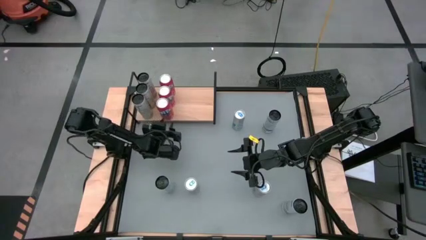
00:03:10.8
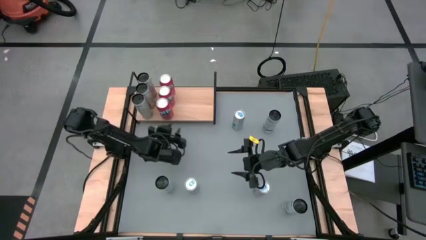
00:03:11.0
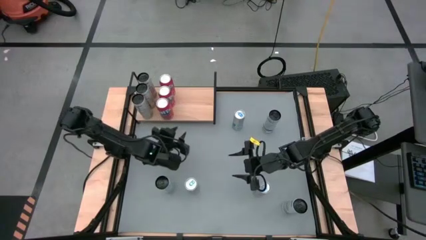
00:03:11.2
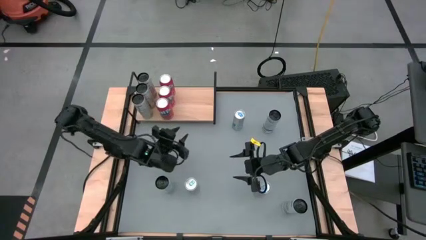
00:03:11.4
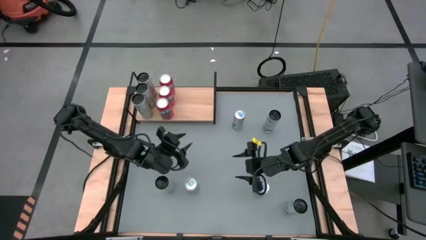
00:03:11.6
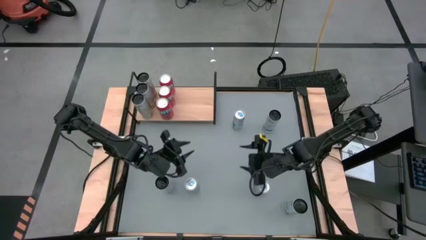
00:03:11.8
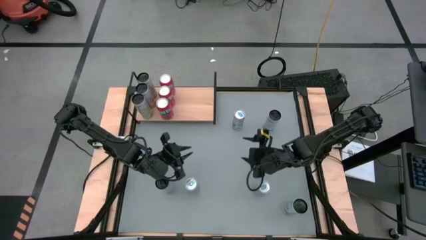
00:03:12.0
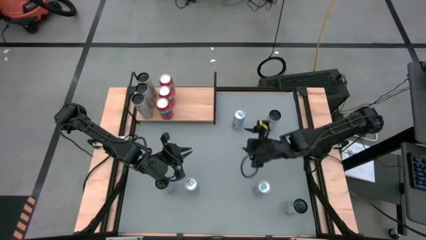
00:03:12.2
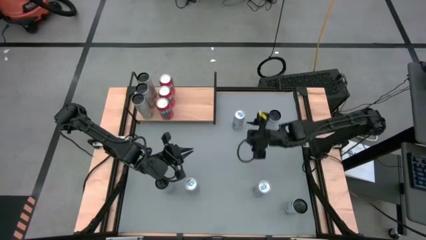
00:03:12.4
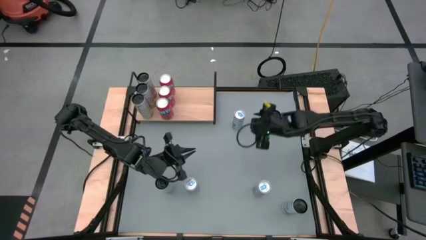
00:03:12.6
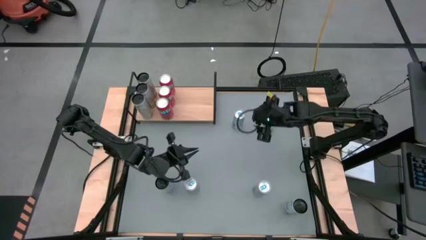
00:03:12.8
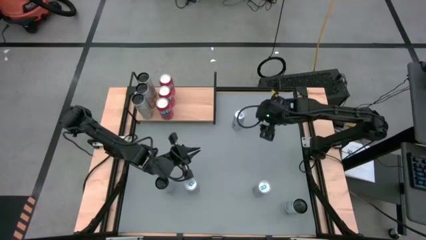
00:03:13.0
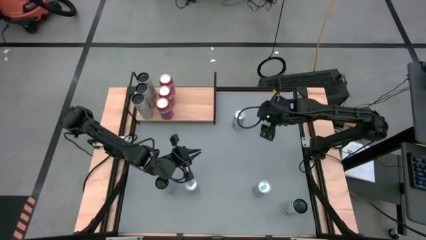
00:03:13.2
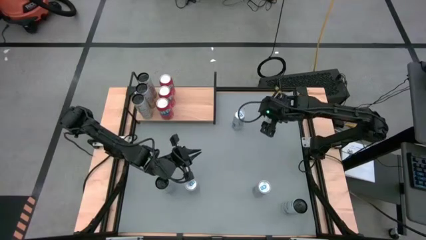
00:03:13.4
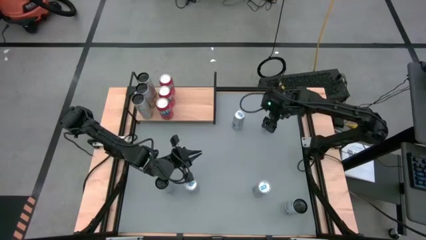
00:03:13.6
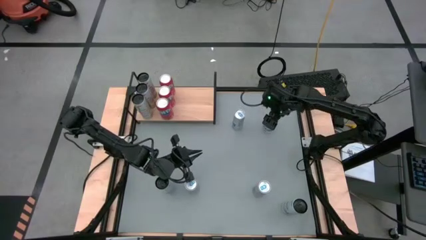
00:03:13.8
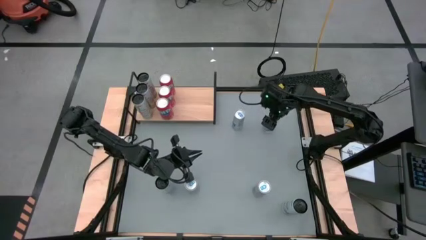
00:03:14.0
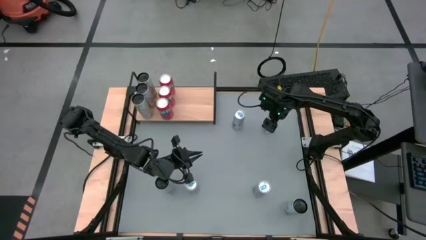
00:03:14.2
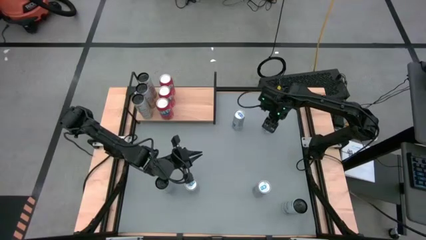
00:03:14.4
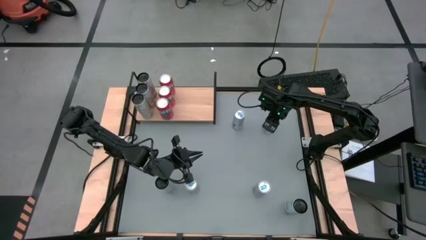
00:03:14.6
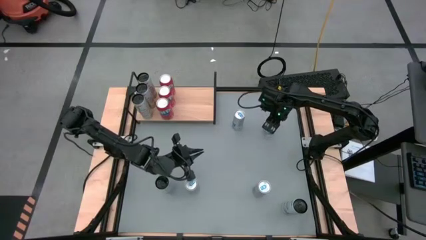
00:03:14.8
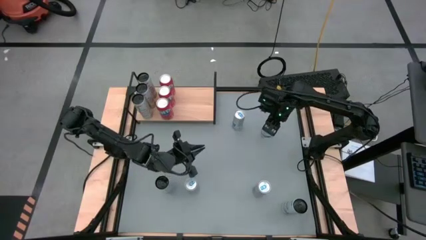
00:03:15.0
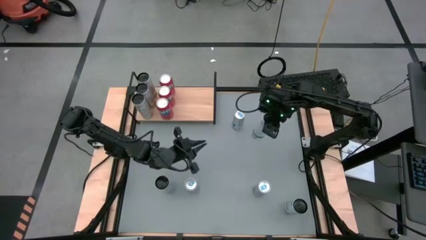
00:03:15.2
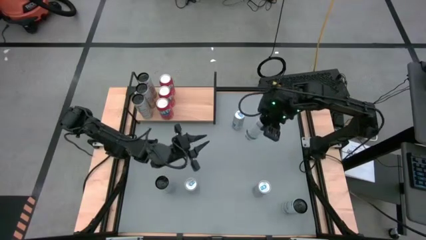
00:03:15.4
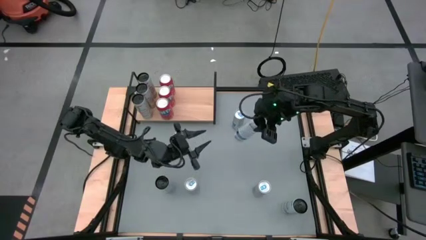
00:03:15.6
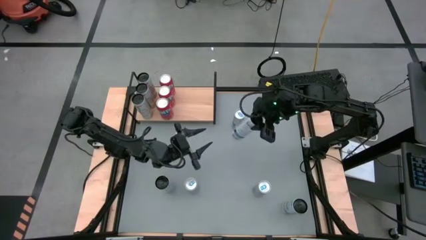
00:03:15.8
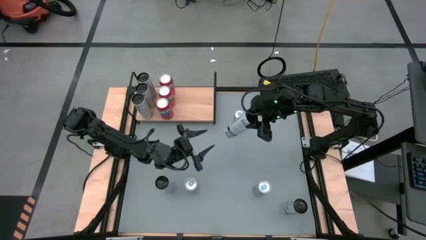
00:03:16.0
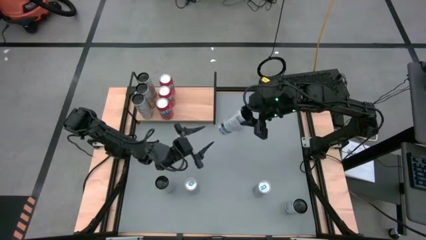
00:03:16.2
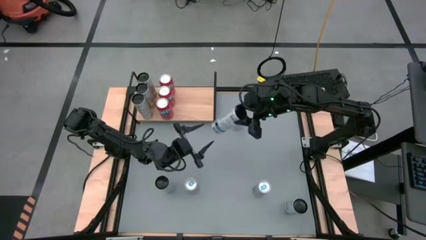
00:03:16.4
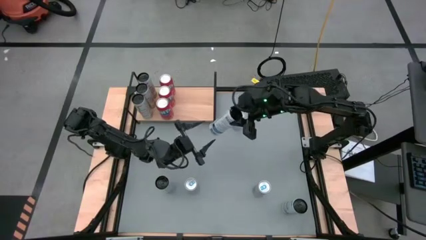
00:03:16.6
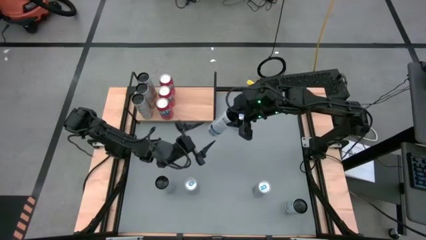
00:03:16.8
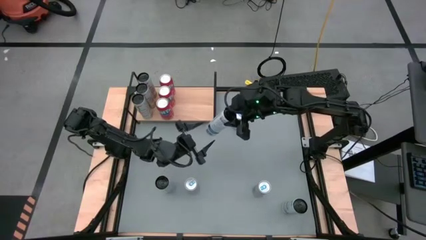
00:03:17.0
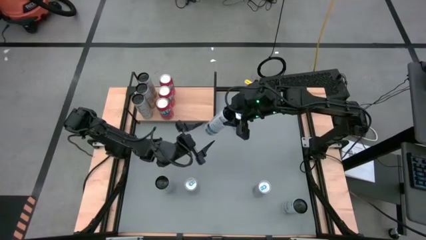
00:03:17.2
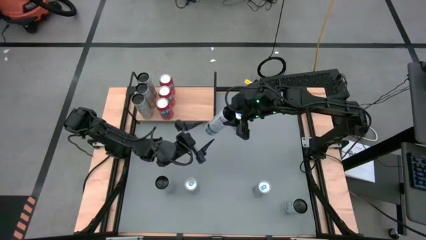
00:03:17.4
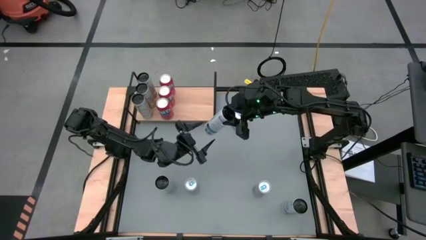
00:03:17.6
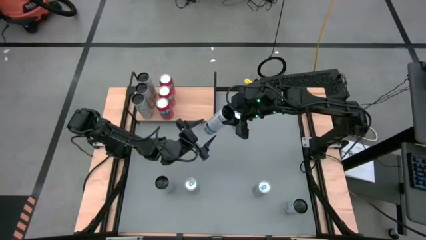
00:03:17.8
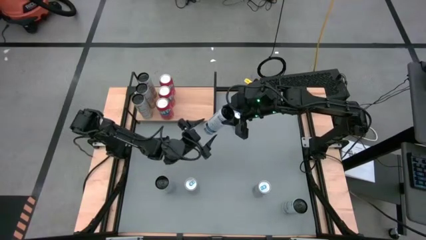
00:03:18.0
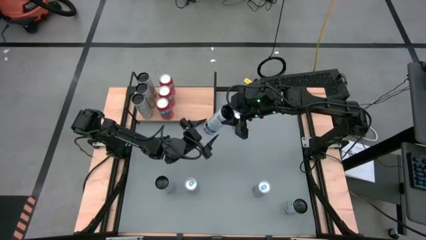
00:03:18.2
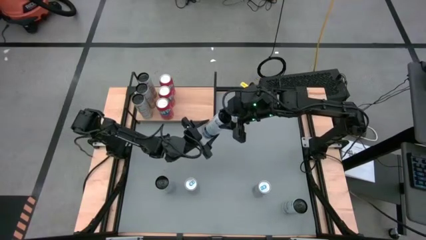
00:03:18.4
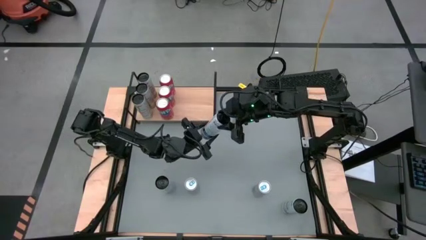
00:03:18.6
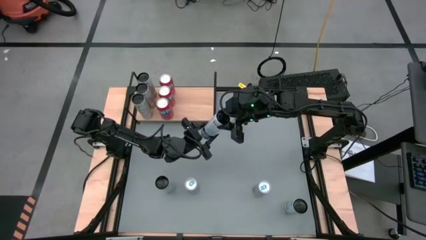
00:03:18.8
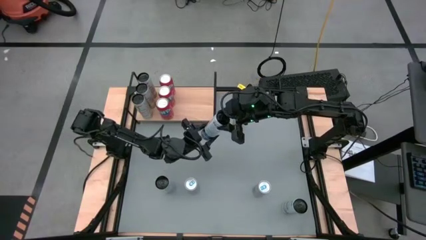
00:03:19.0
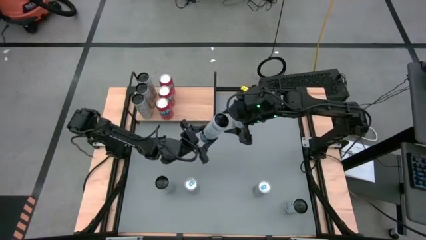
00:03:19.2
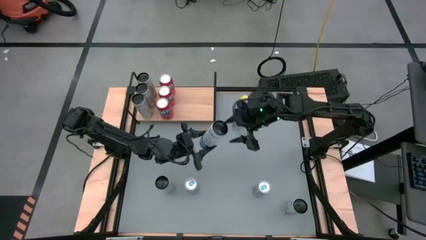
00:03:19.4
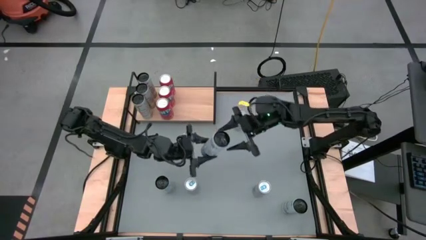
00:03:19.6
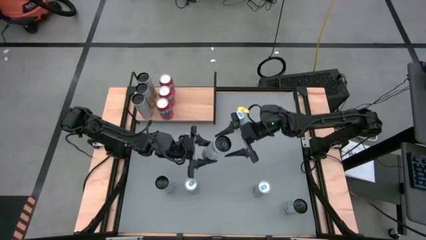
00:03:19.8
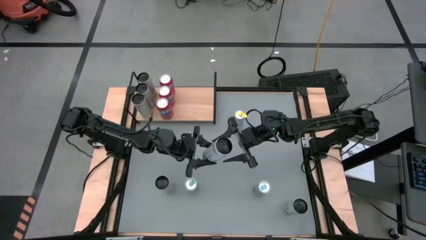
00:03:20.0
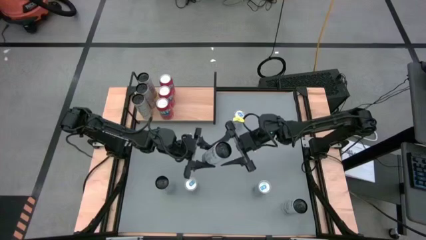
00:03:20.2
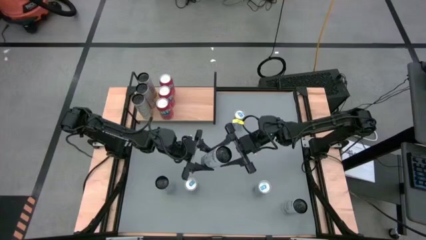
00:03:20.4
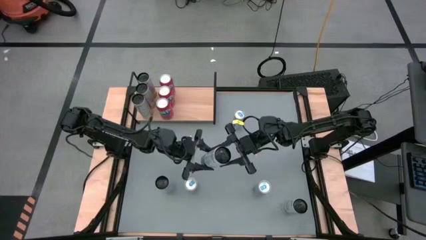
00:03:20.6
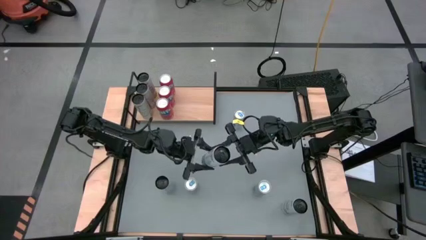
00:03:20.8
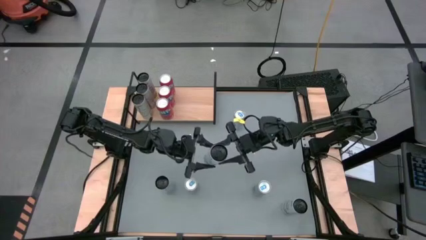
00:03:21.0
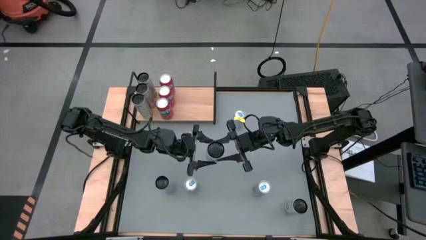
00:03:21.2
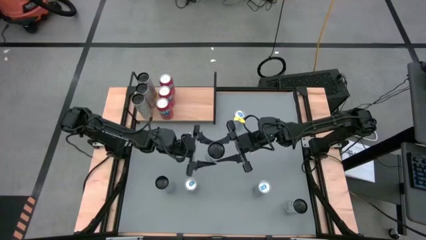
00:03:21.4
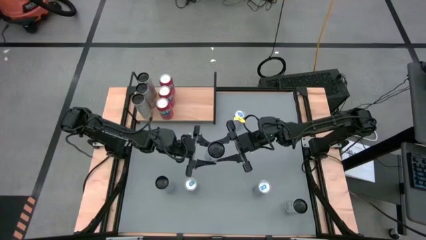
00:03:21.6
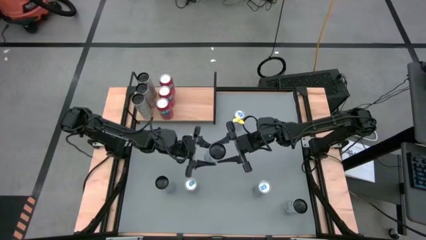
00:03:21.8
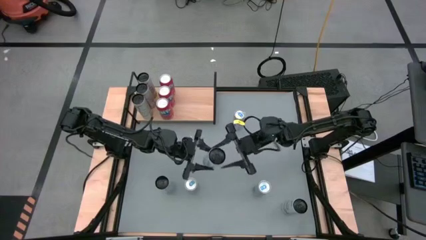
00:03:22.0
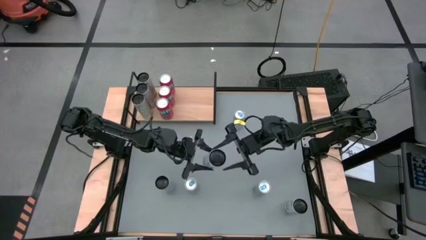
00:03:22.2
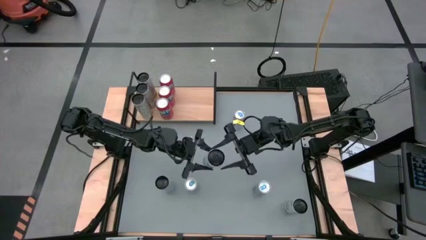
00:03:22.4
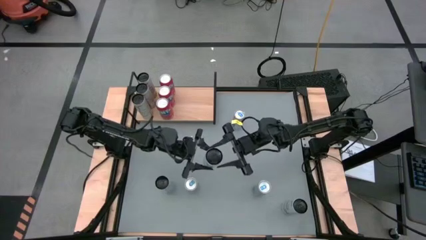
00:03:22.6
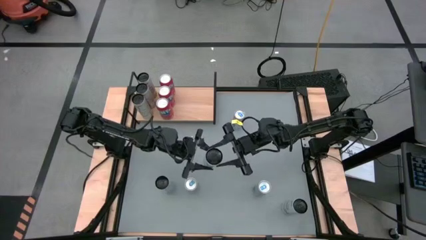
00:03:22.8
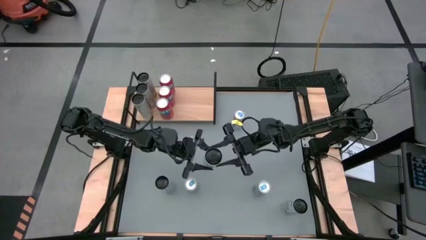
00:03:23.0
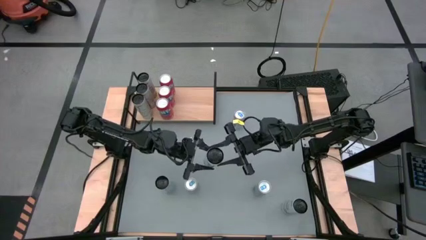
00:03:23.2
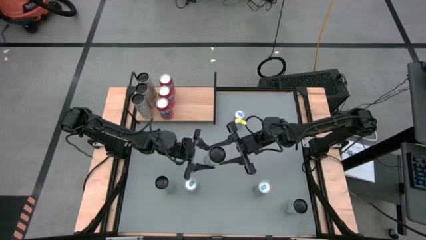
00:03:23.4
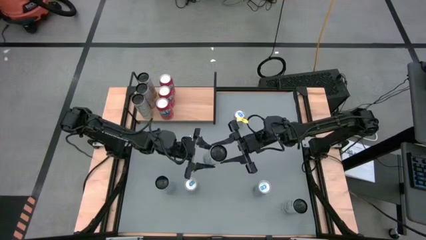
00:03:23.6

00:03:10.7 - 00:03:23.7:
Task: Place canned beverage on shelf
Put the top white-blue soda can on the shelf
